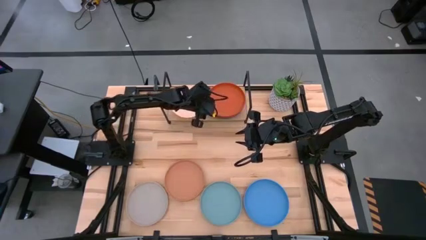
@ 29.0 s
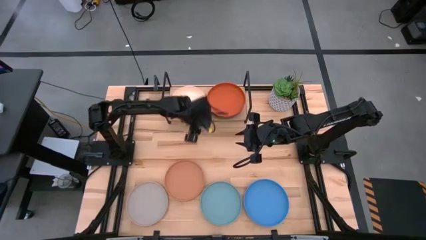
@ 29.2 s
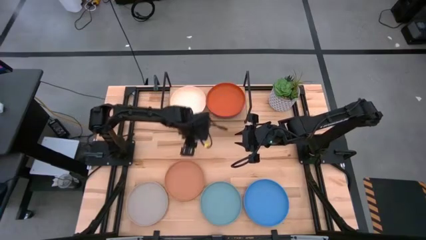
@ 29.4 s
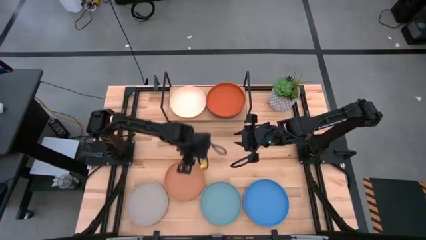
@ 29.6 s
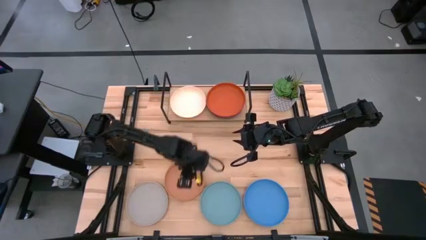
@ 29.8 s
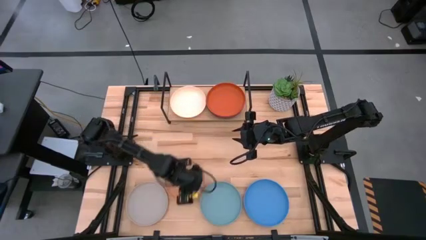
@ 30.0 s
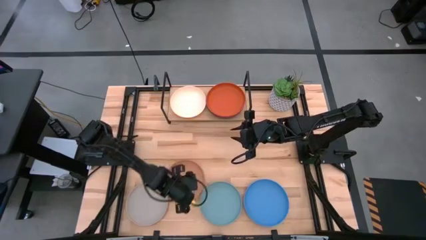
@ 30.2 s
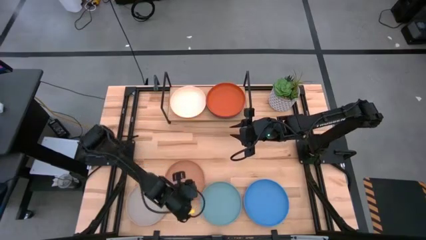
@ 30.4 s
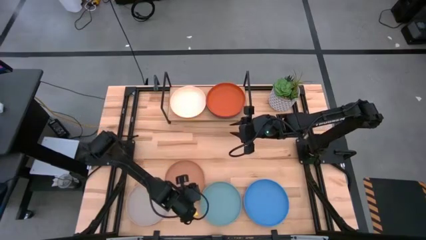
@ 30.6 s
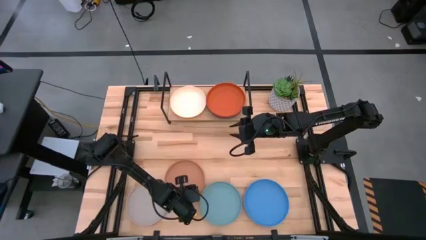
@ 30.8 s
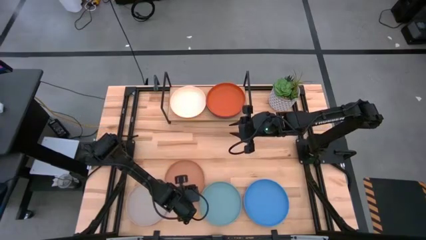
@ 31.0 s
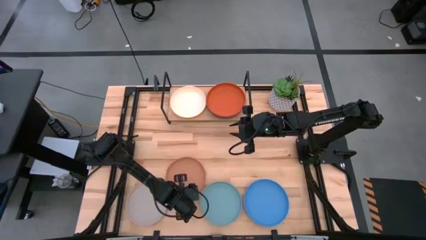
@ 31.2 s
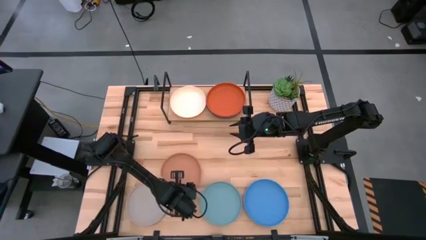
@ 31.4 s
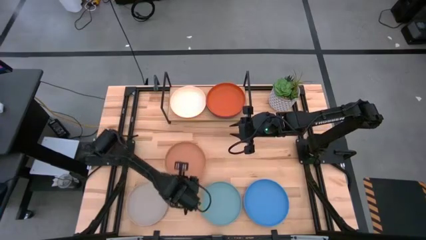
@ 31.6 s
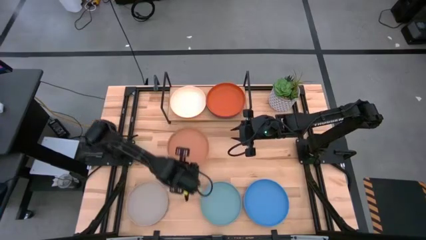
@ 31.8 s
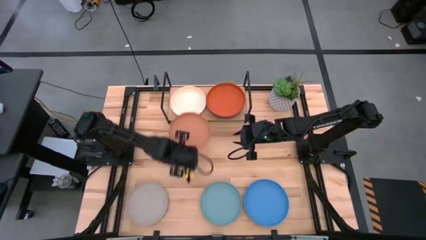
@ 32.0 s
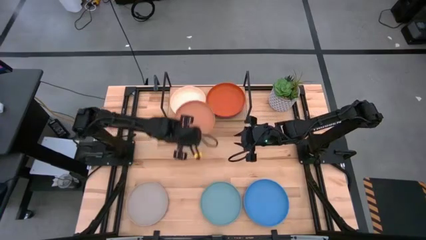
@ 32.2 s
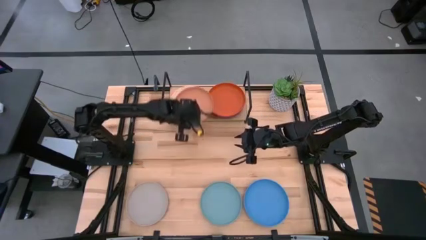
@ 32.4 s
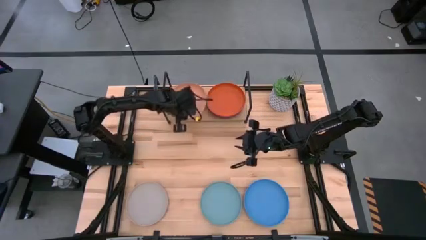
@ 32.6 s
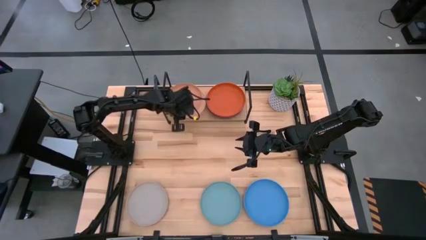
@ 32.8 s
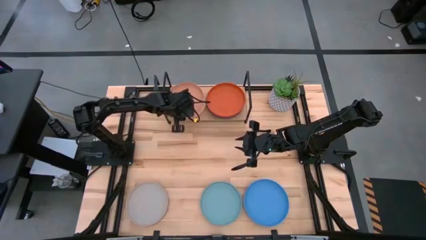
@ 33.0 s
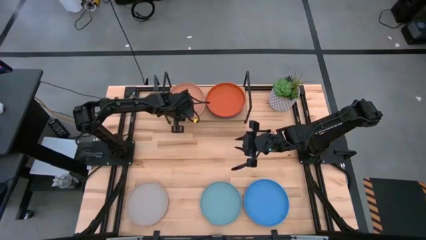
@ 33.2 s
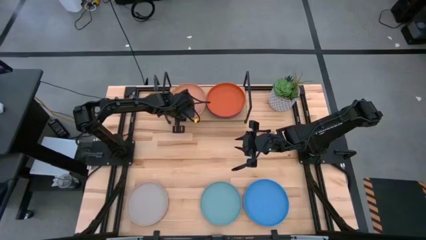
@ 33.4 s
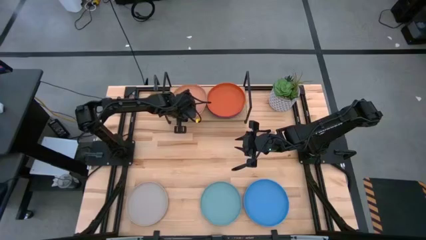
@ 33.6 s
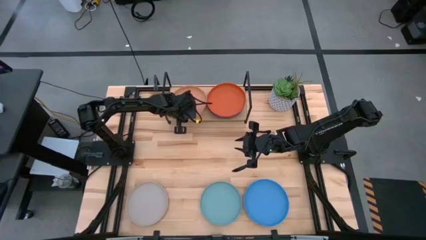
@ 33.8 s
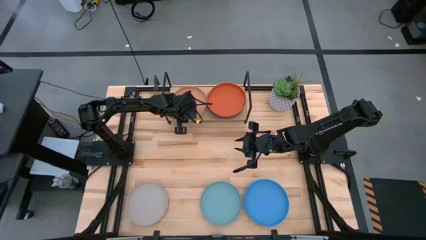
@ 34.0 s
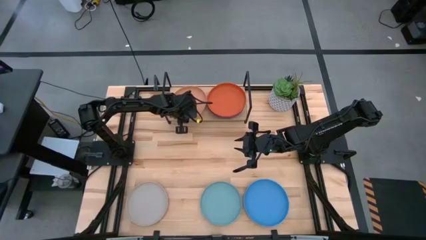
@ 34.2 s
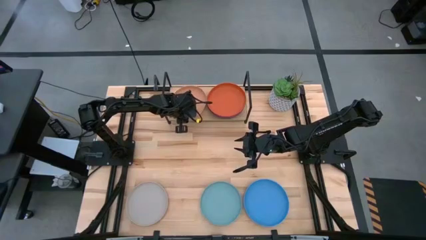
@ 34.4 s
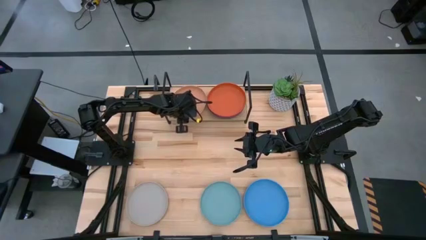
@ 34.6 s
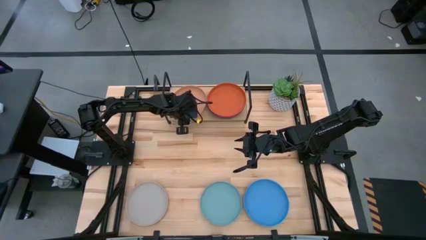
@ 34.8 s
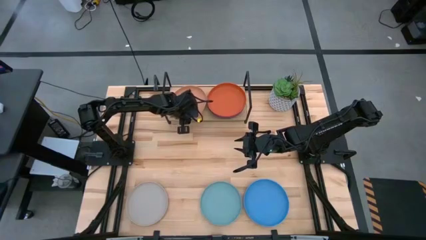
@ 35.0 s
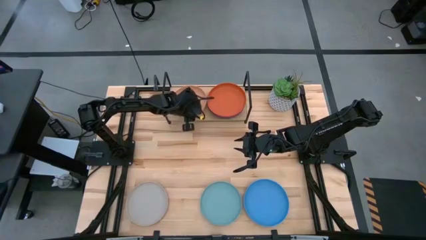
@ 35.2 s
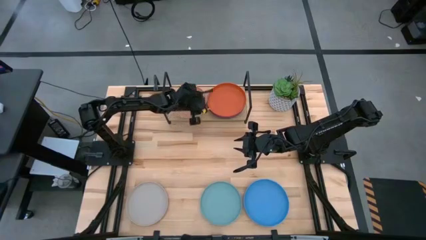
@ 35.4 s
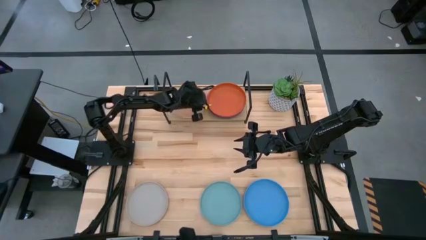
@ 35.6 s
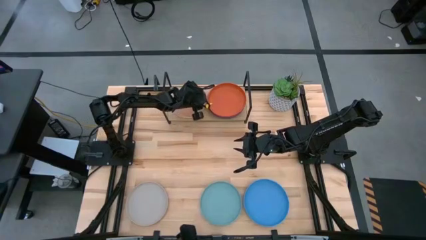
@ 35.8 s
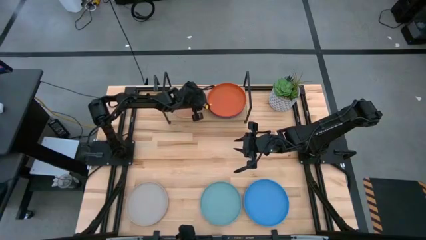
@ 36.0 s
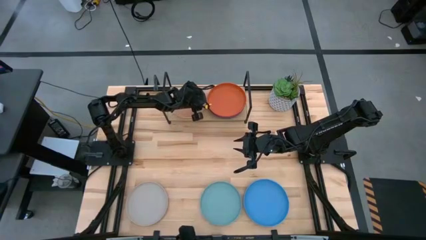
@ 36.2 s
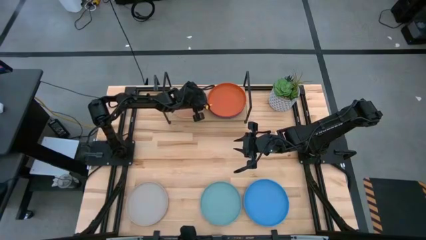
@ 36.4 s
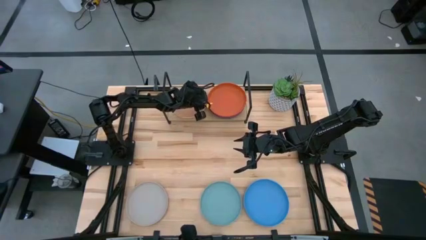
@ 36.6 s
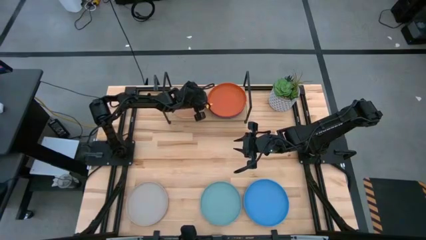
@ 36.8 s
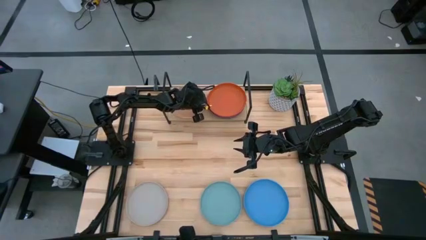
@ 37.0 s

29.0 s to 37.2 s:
Task: Place and stack plates onto a shelf
Stack the brown plate on top of the light orange plate on the shelf

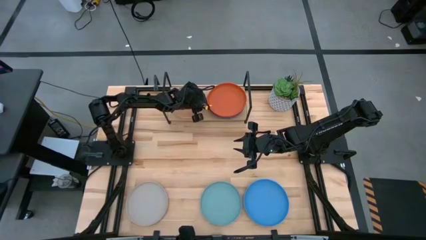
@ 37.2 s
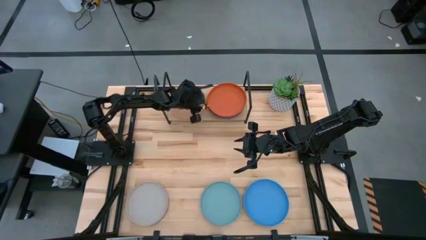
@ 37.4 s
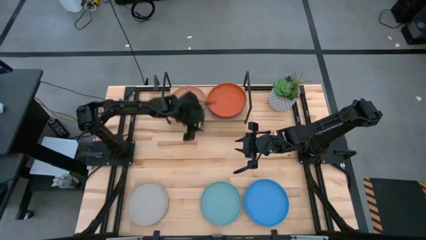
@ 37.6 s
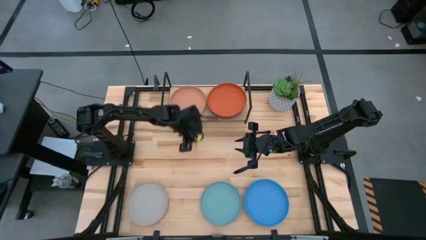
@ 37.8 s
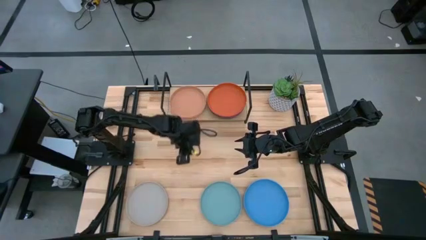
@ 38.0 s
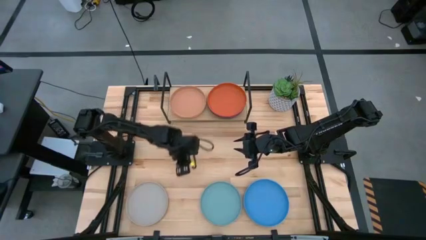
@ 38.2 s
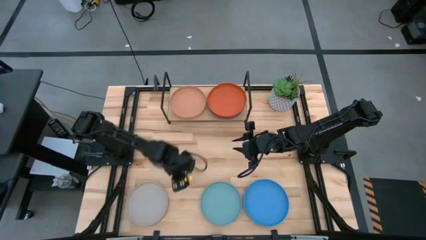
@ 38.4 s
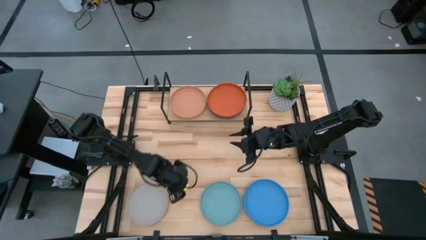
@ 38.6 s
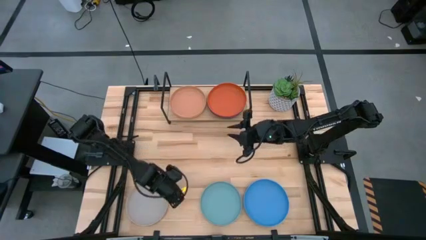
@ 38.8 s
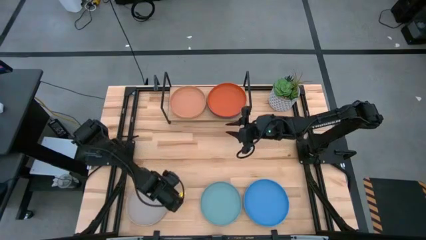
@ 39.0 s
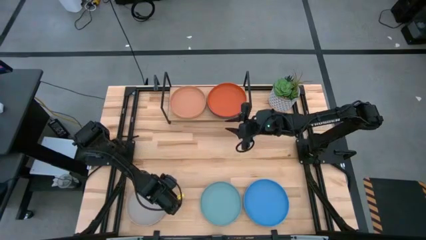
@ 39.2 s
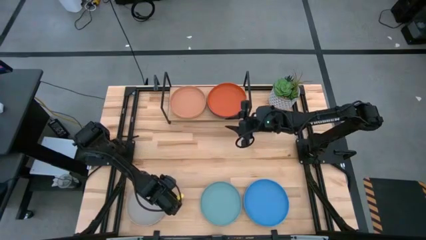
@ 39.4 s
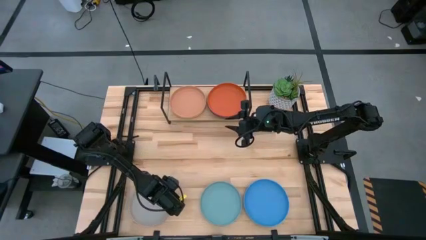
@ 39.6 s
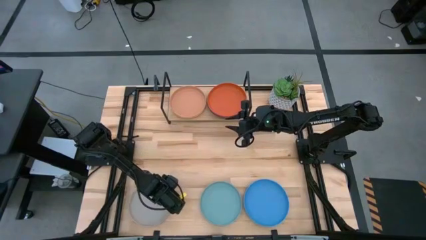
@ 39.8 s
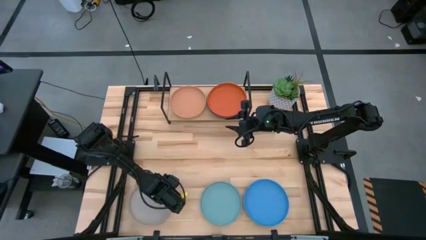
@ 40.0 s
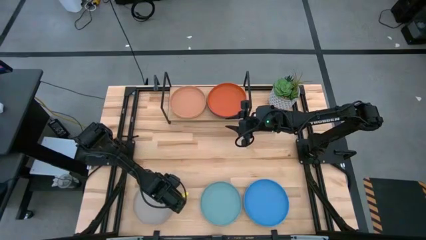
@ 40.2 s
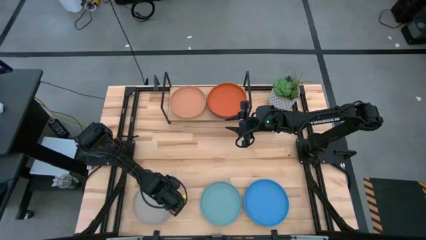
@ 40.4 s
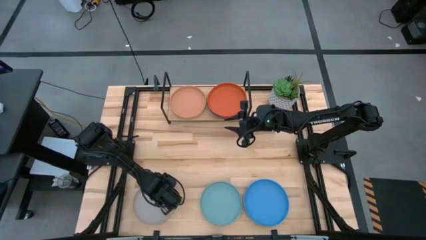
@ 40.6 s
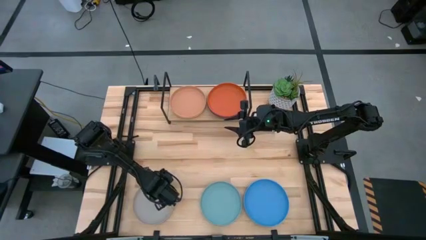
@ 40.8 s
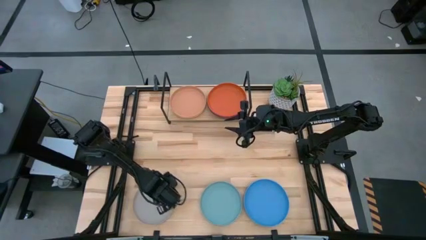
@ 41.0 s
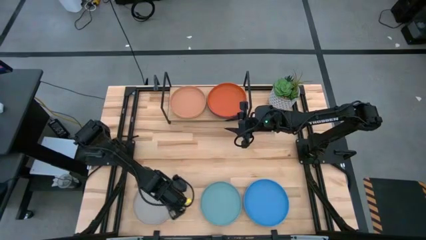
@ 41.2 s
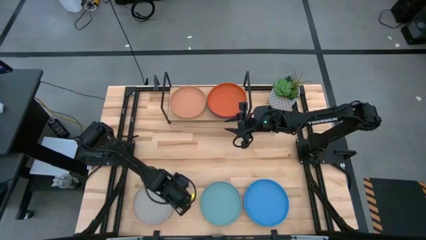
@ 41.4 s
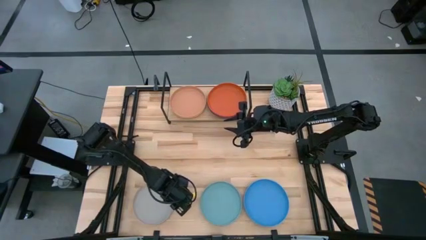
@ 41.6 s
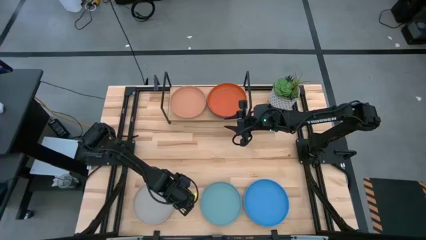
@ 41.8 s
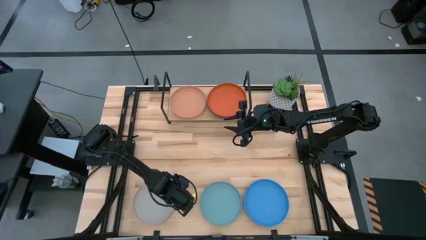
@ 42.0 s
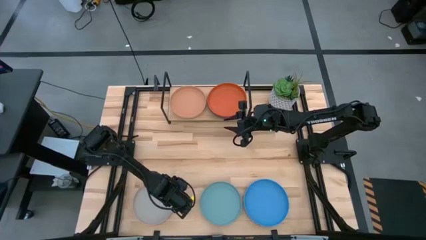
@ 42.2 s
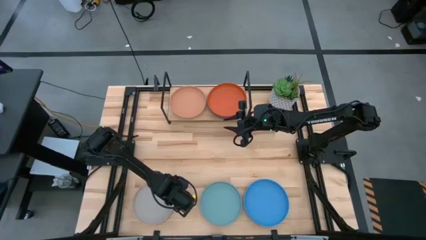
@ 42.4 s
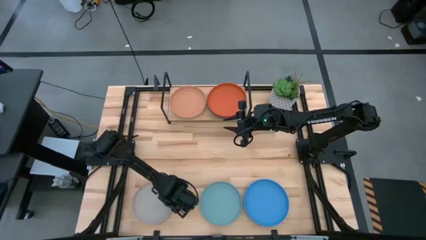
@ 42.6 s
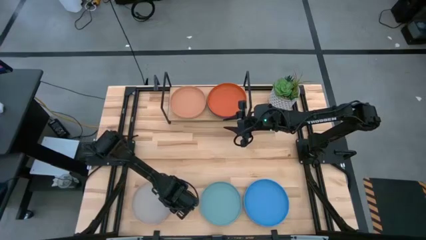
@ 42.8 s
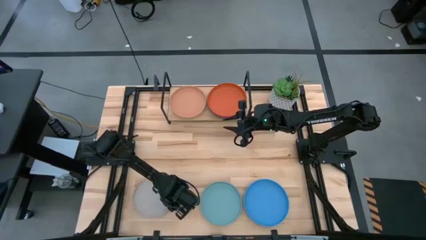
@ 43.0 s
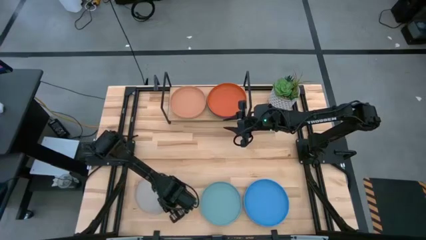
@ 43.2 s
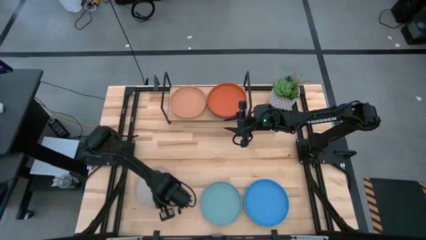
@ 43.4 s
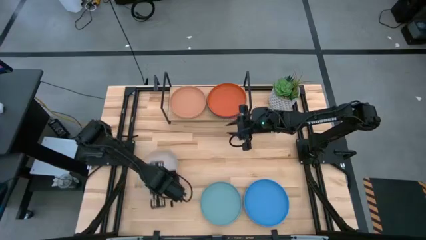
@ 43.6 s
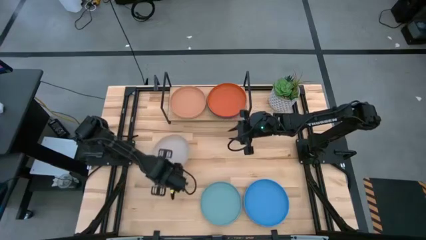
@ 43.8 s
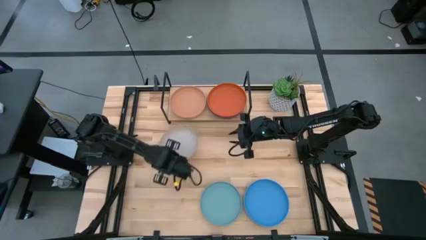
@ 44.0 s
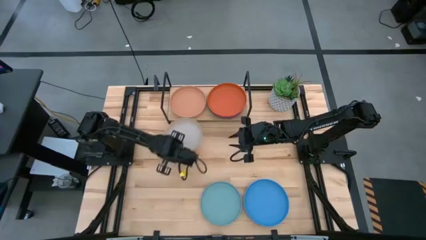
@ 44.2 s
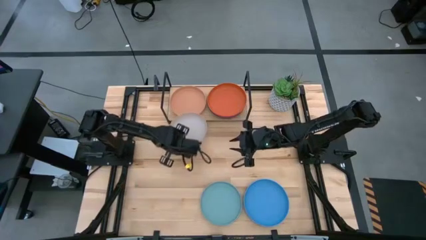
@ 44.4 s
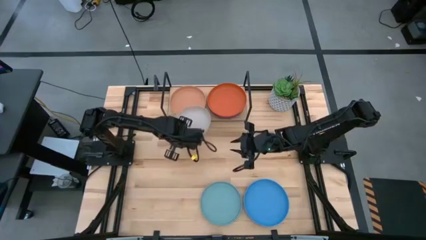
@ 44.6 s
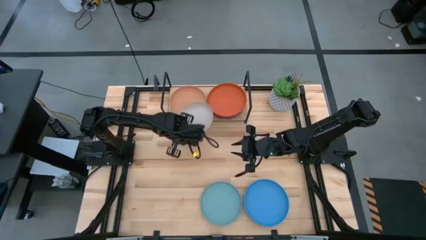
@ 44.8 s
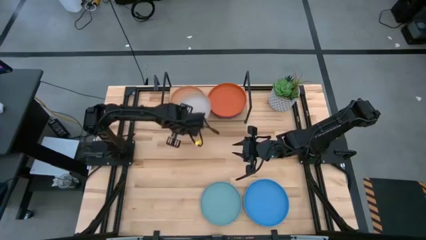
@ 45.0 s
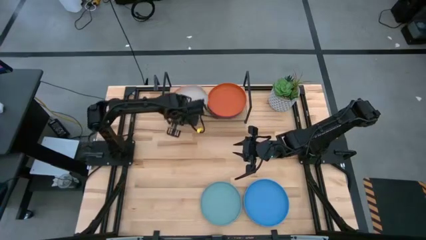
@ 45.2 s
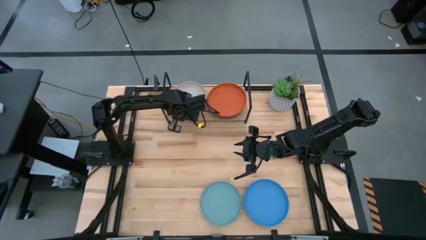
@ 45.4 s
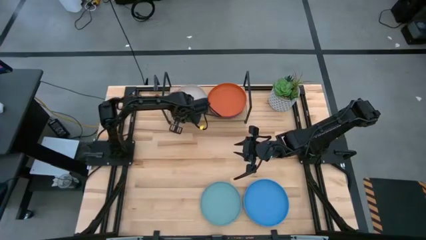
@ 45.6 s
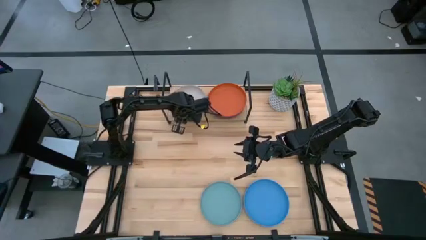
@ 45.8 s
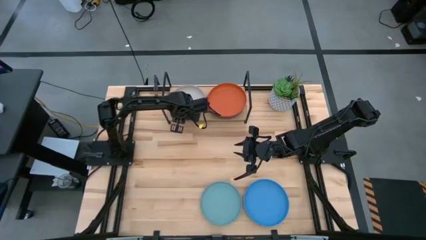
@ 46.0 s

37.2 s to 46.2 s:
Stack the gray plate on top of the brown plate on the shelf
